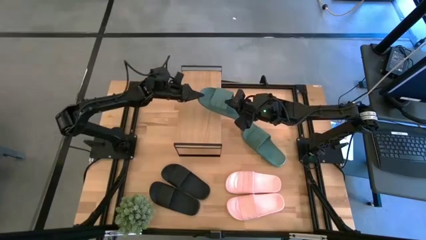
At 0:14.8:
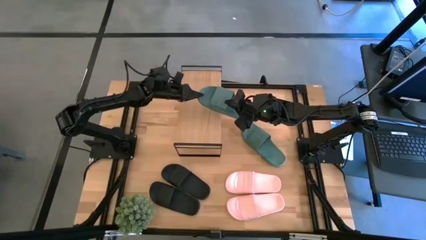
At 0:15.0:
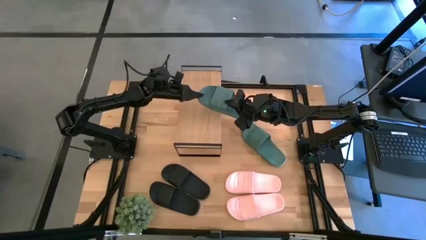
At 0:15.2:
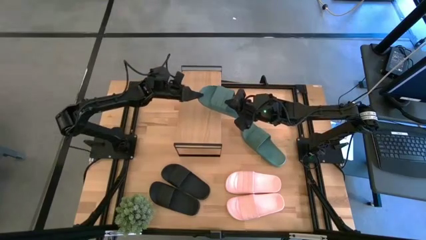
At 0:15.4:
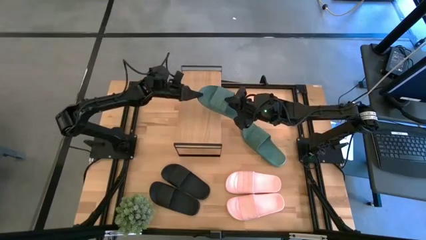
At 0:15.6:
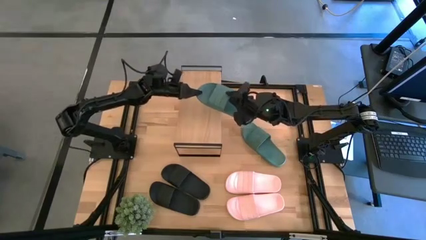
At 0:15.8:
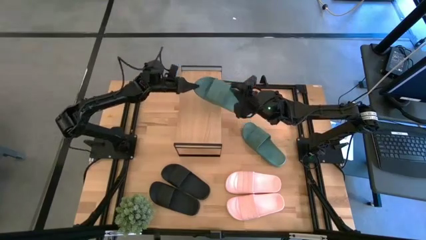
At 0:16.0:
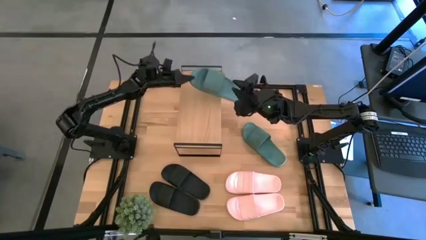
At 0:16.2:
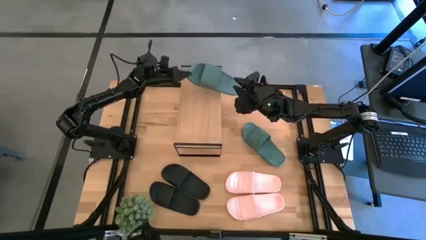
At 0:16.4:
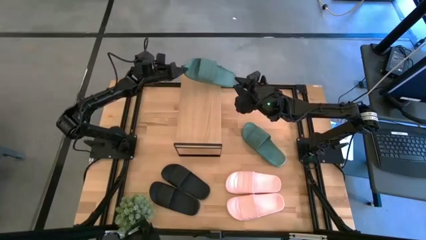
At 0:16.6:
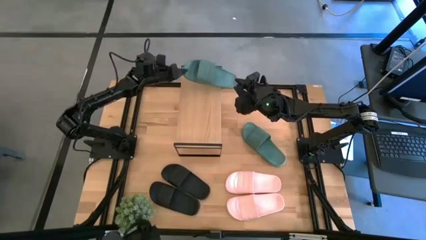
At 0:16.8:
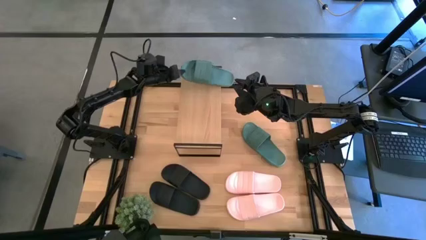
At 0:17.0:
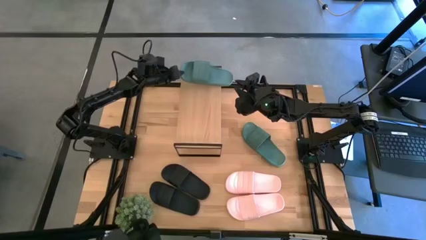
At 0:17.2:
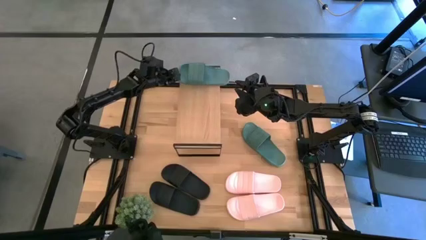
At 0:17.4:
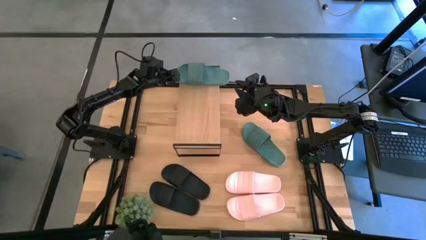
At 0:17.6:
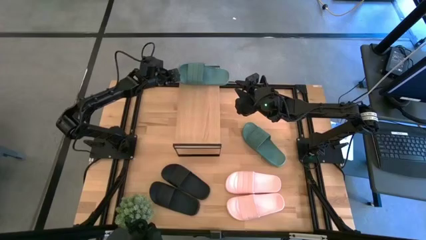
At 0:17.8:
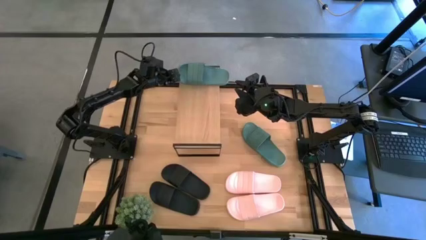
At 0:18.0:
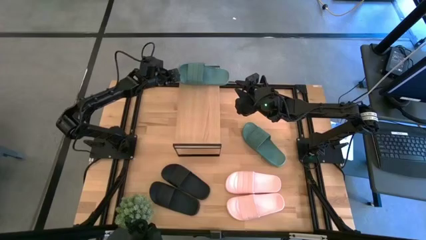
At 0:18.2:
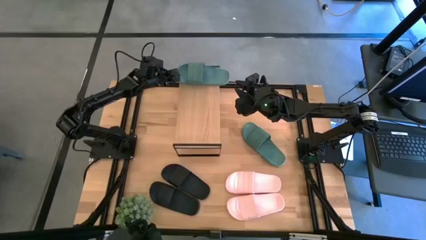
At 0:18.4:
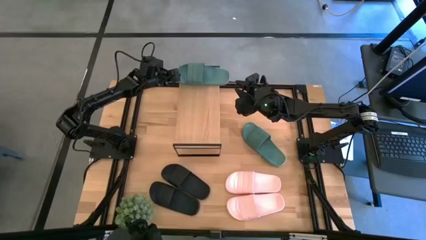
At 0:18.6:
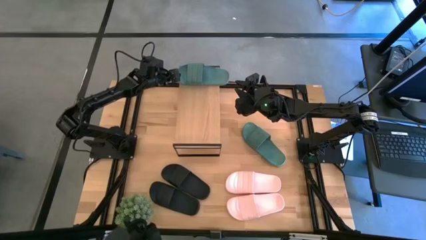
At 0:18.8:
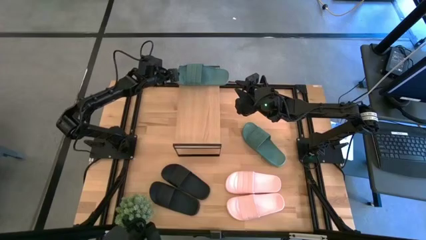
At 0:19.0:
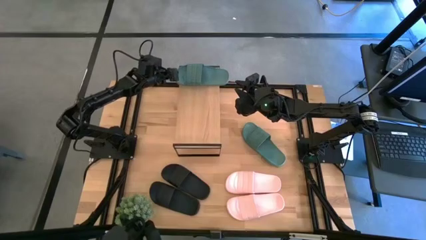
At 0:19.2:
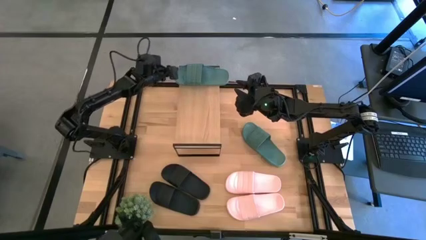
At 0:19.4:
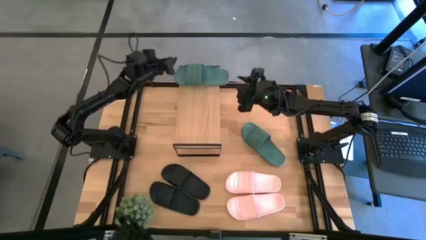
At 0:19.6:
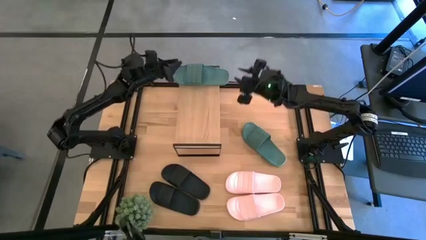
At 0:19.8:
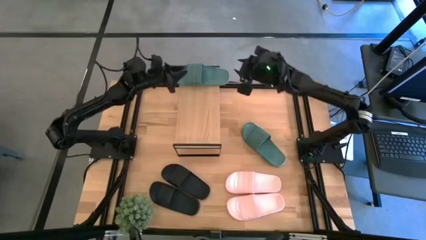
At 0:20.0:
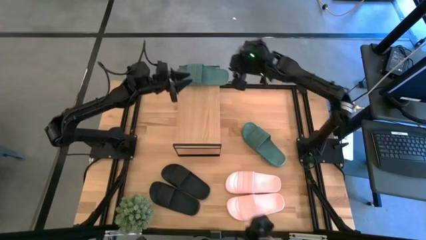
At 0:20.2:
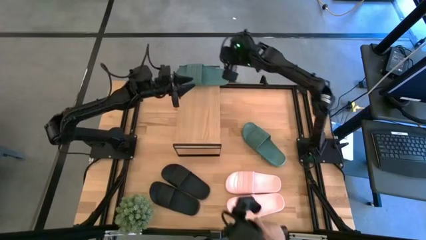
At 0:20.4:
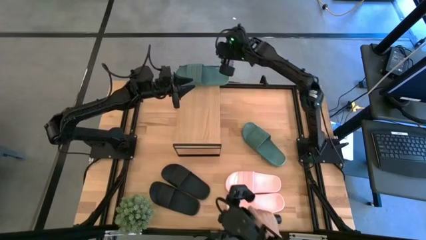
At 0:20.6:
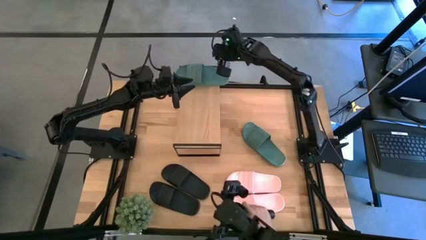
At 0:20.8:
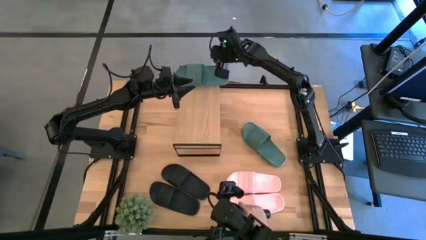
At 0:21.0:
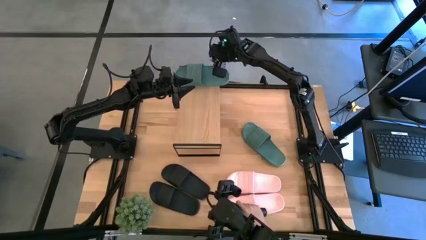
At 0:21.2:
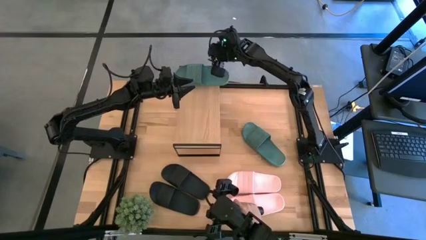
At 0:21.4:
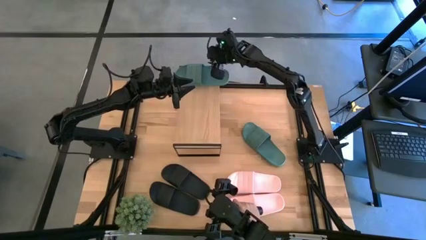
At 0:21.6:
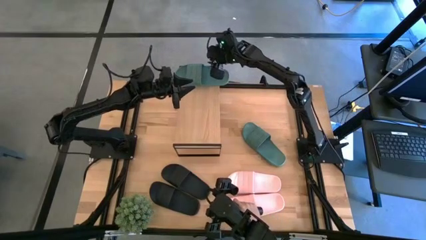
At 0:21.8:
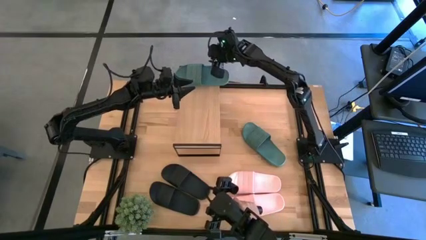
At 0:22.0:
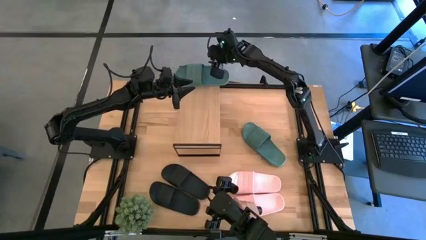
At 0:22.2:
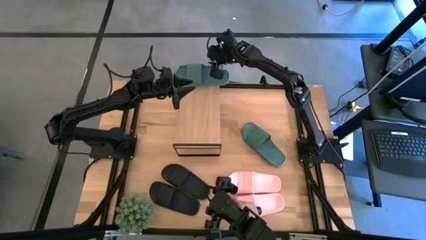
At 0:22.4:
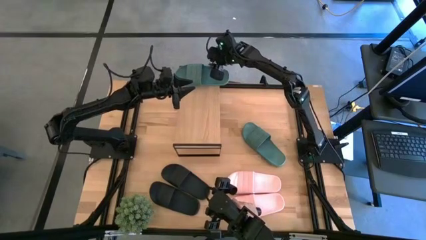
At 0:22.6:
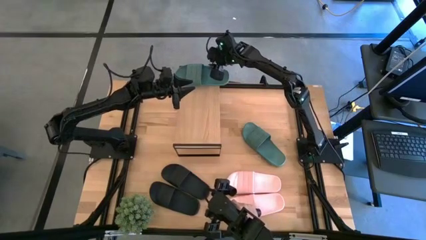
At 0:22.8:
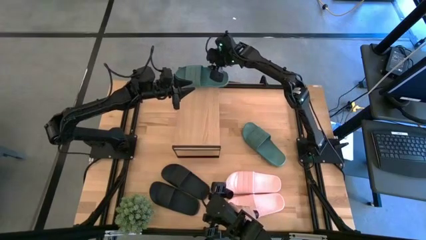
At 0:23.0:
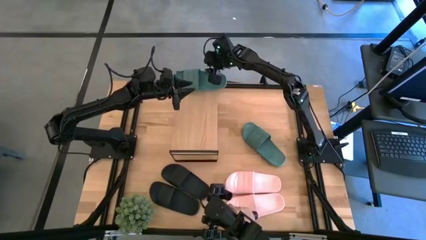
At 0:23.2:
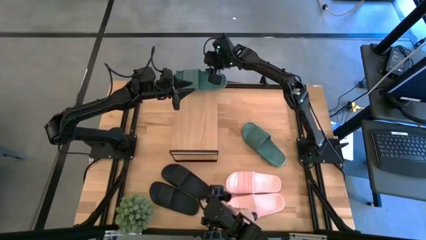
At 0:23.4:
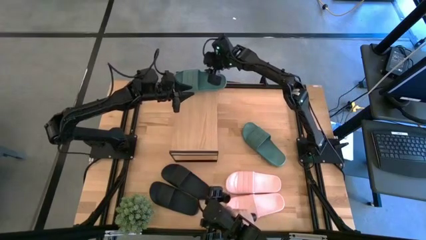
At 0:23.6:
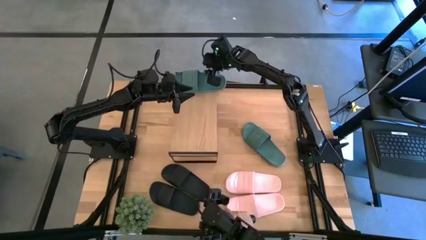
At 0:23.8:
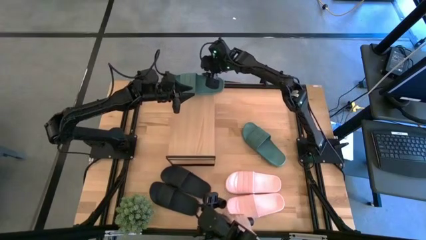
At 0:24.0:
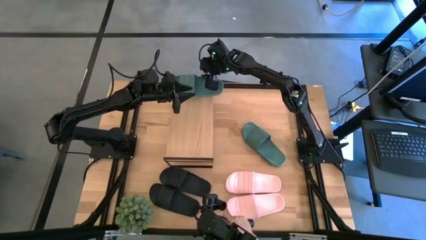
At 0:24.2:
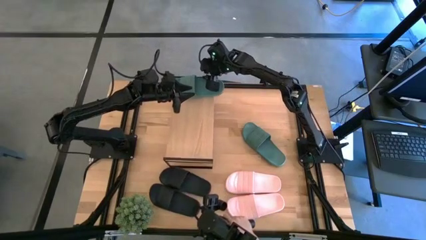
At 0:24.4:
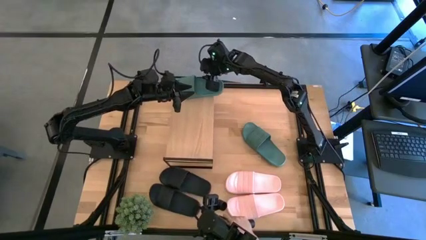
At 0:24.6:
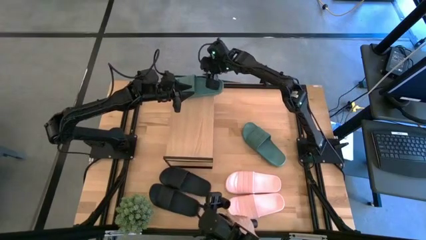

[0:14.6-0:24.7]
Task: Pick and place slides into the shelf
Put the right green slipper on the shelf
